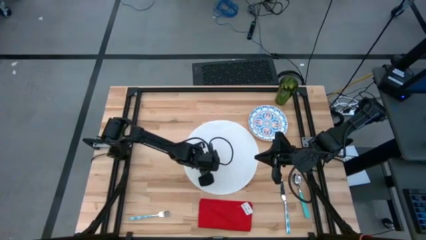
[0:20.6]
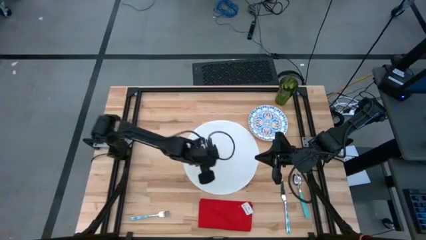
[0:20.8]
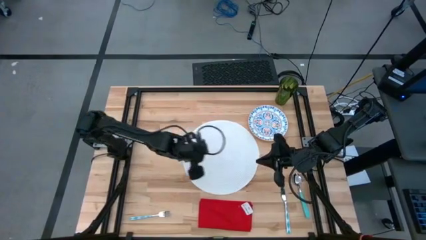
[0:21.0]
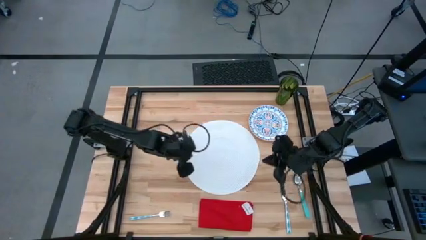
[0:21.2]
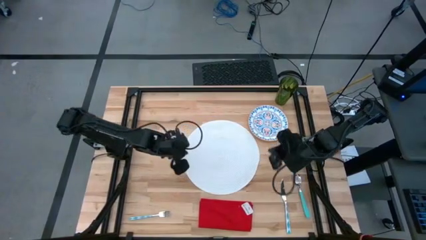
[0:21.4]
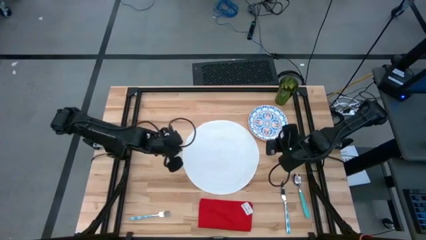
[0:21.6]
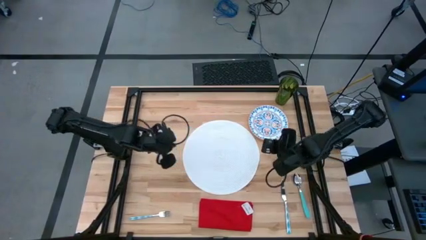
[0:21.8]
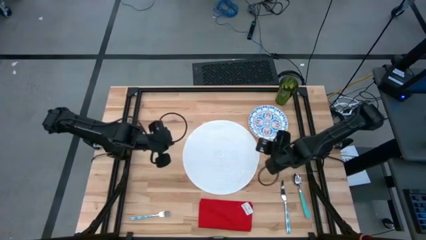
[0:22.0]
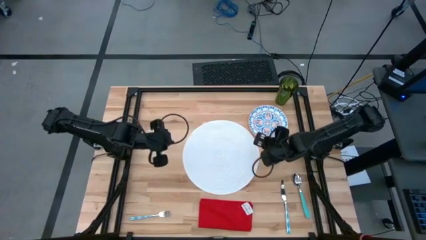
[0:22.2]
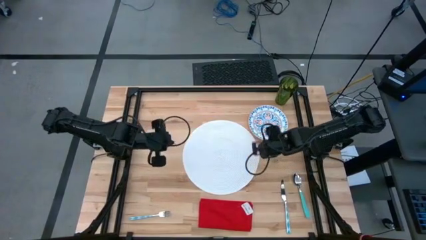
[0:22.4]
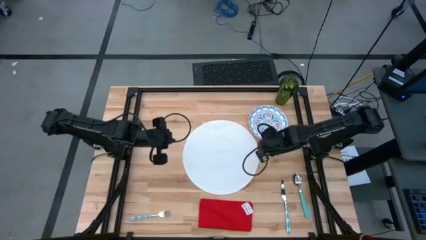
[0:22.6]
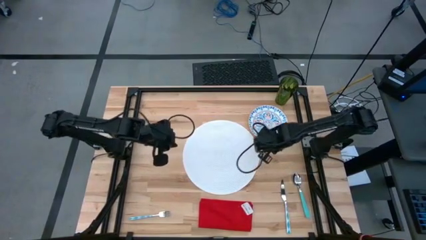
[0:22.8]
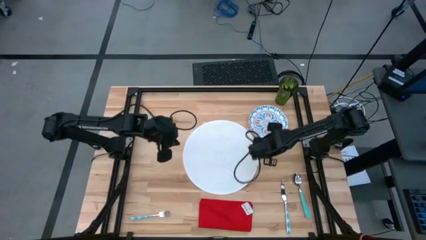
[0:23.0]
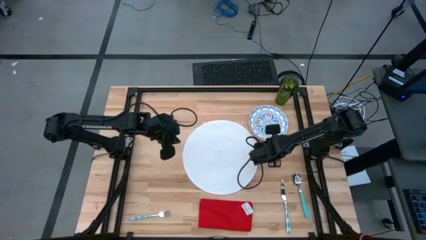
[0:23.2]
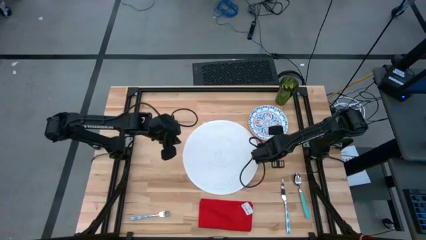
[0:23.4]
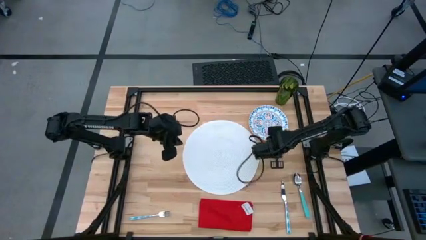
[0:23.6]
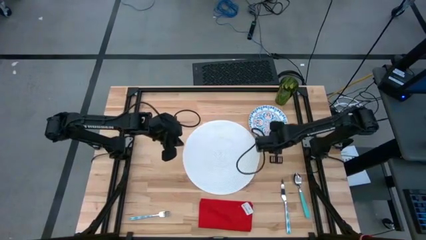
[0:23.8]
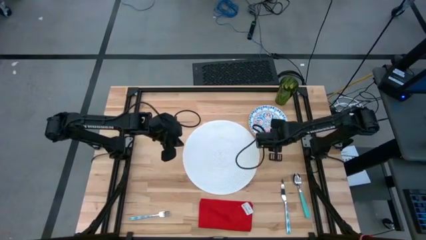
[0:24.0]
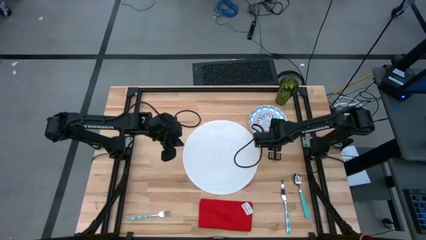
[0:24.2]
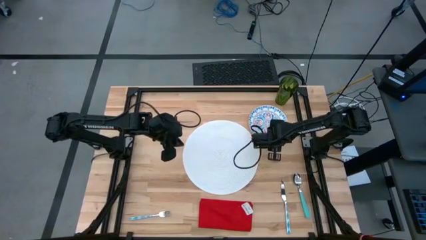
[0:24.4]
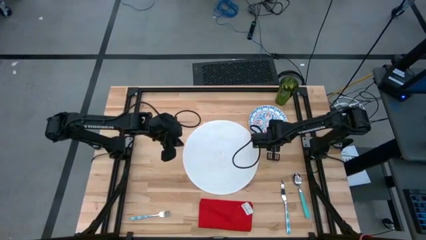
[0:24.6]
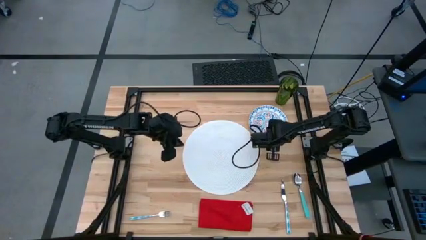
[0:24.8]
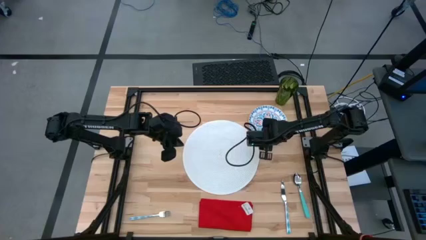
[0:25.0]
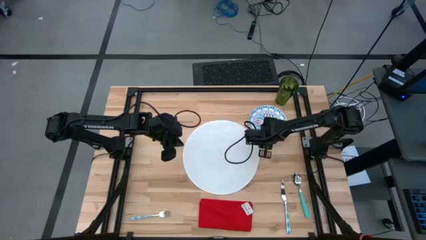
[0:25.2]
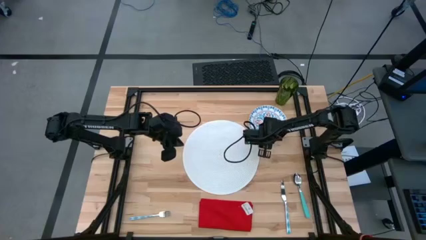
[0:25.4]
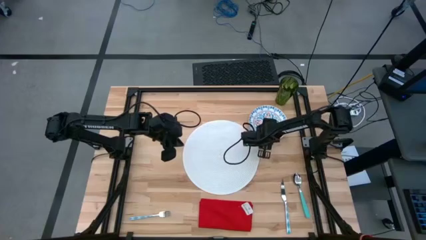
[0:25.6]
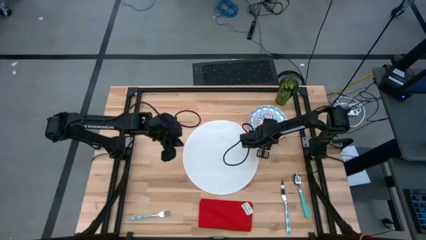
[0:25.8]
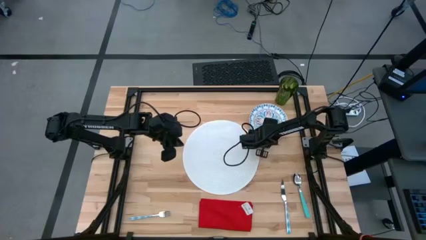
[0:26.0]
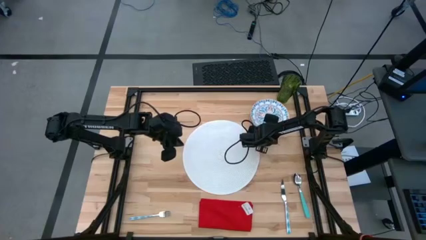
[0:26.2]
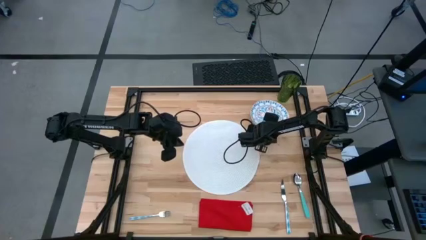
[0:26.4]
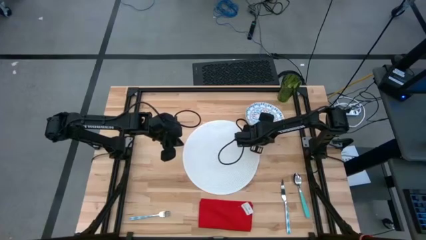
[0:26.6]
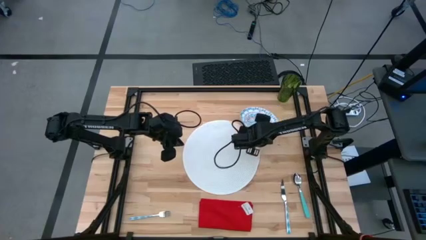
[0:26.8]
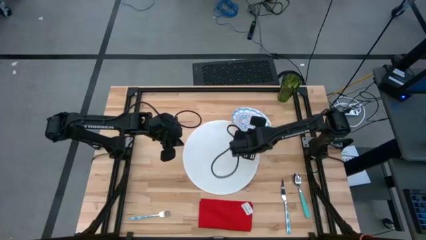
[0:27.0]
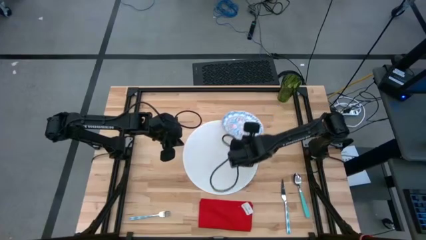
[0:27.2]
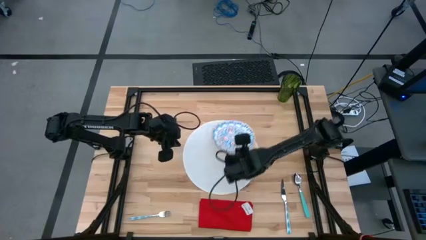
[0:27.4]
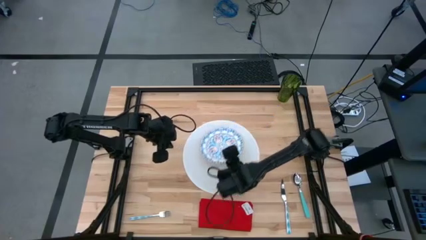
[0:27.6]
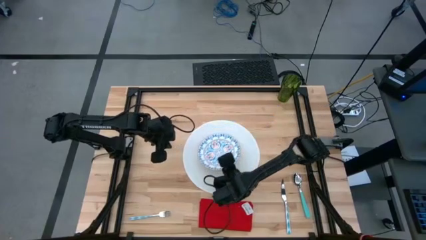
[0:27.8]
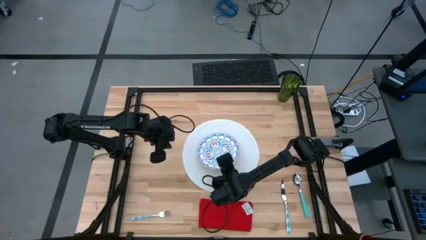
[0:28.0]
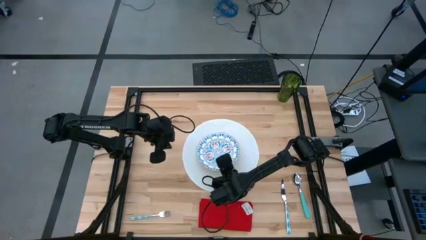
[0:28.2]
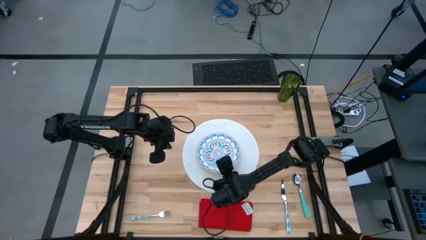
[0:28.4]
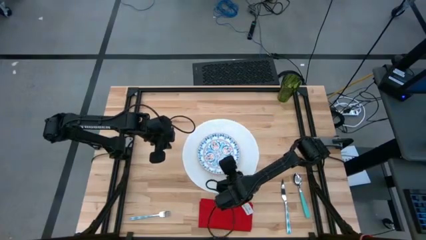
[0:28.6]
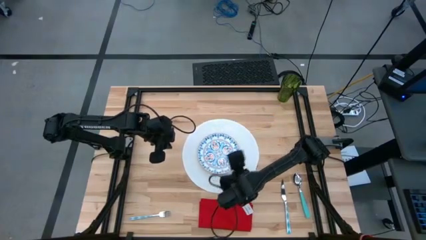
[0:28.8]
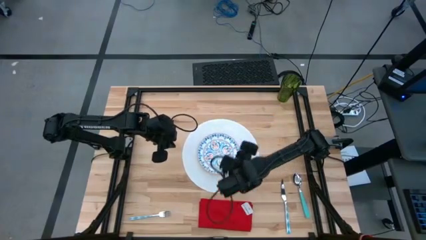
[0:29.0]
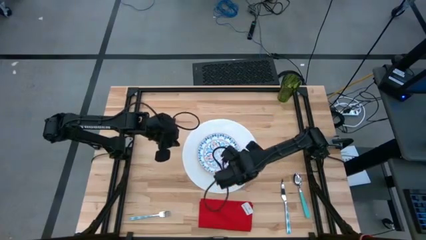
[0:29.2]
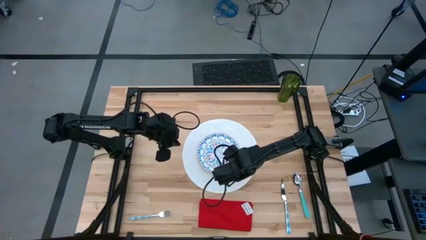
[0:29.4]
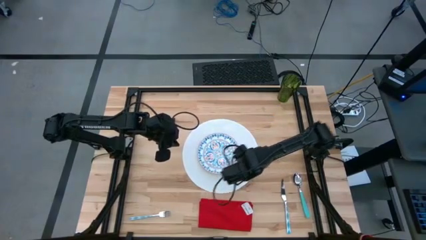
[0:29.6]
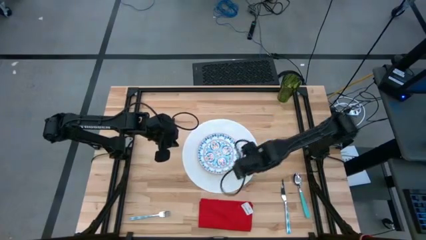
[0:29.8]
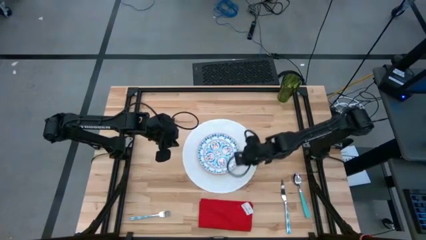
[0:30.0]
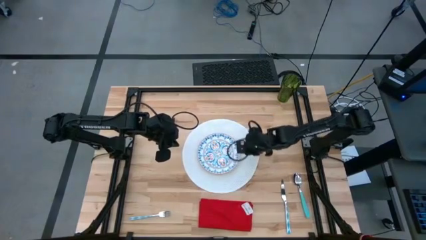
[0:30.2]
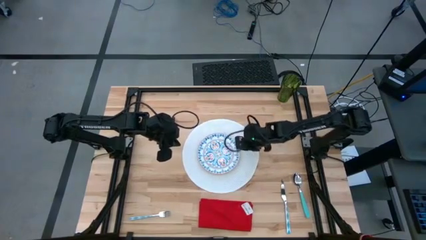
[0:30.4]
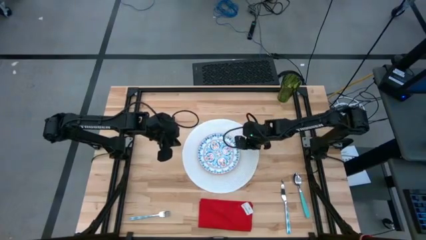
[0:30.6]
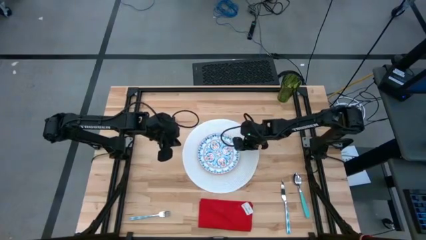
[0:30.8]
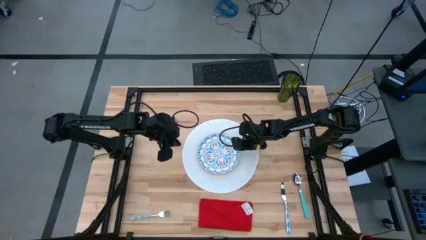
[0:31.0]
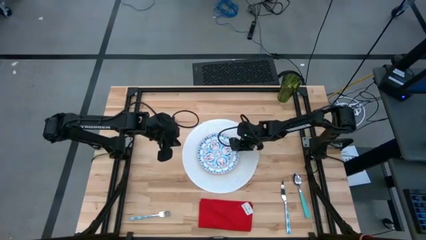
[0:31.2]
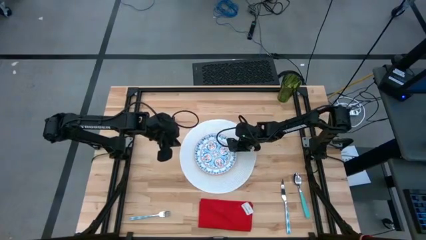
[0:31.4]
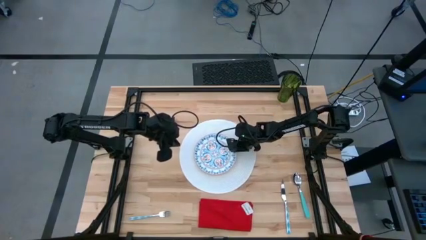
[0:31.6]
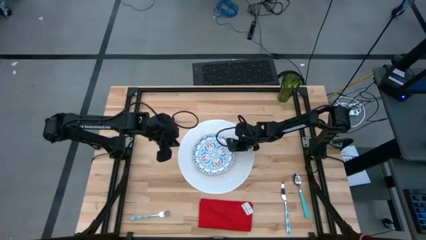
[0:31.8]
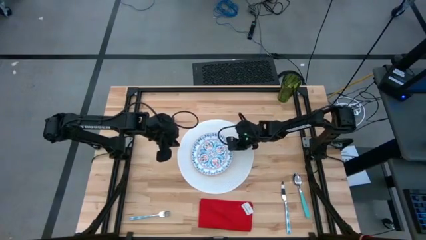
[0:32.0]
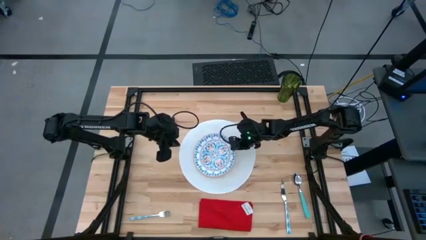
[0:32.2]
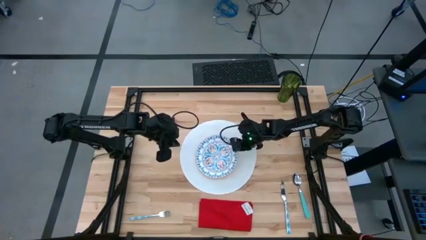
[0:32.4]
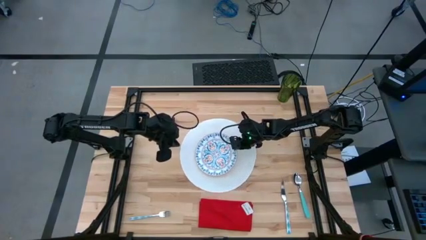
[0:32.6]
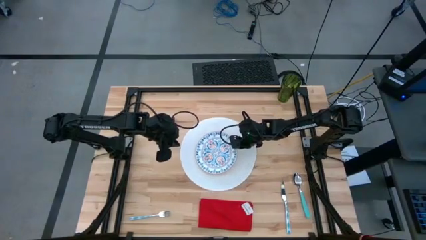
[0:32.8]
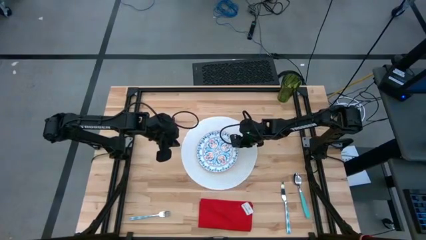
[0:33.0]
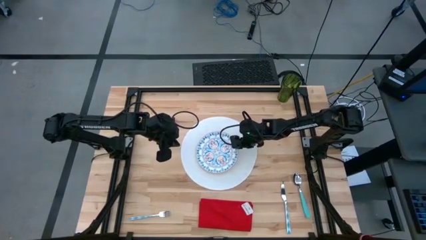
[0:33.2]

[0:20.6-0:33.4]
Task: Set table place
Put the blue orange plate on the white placemat

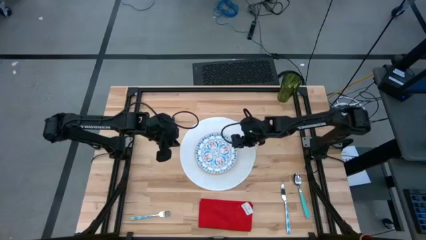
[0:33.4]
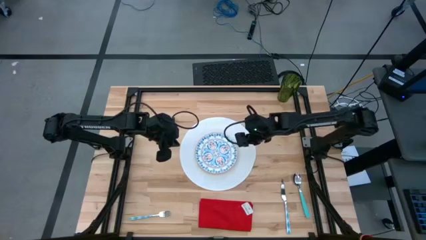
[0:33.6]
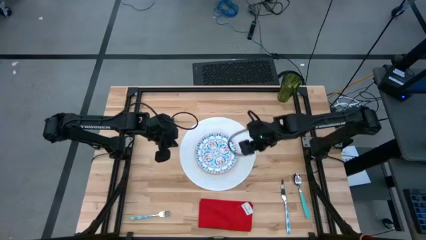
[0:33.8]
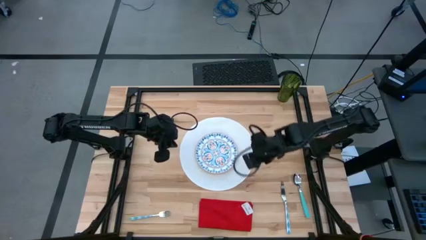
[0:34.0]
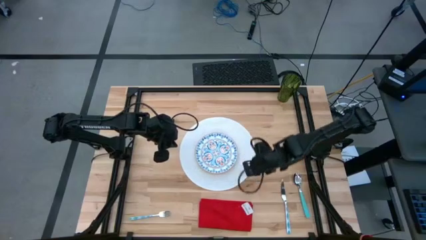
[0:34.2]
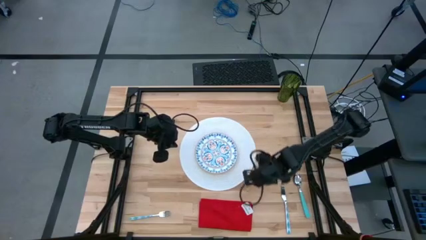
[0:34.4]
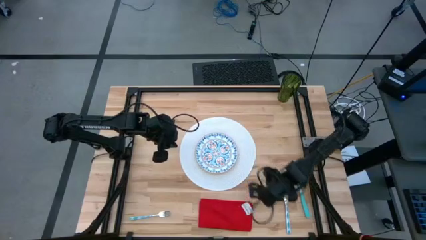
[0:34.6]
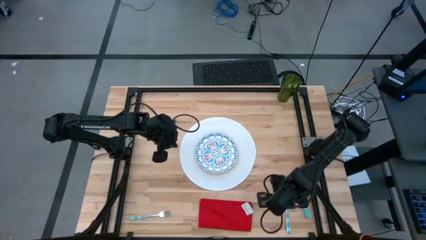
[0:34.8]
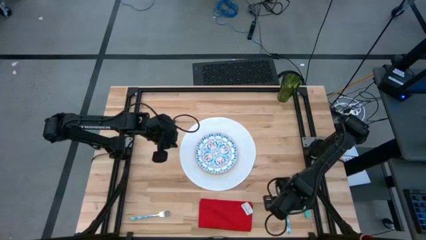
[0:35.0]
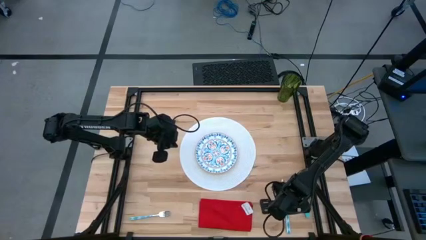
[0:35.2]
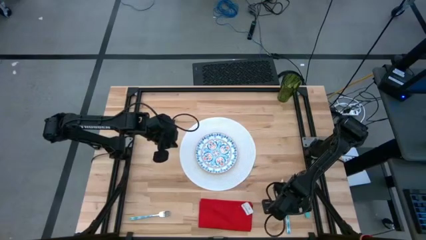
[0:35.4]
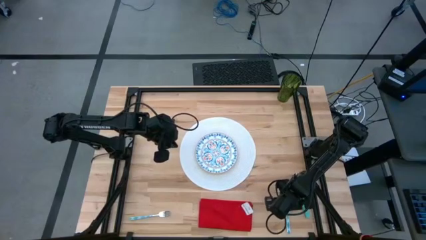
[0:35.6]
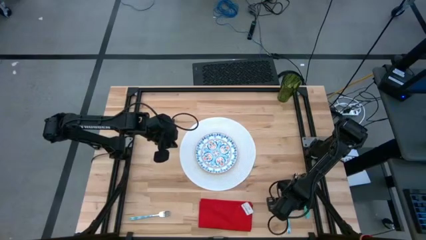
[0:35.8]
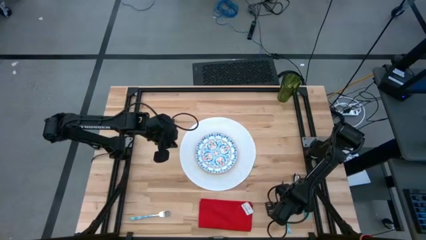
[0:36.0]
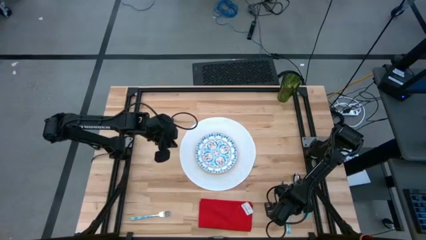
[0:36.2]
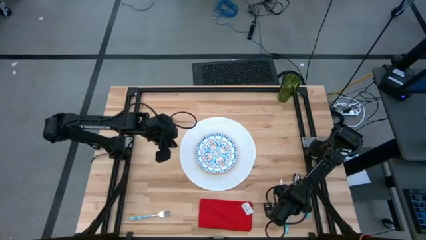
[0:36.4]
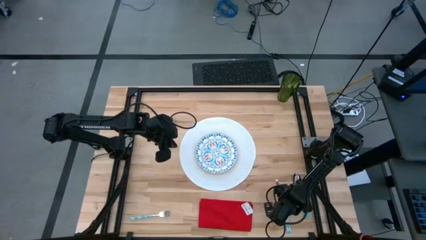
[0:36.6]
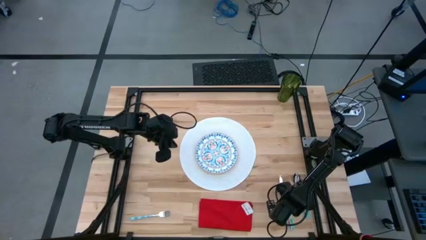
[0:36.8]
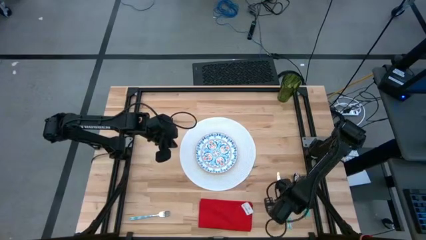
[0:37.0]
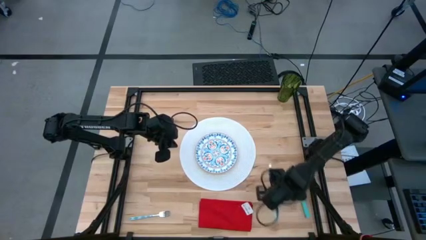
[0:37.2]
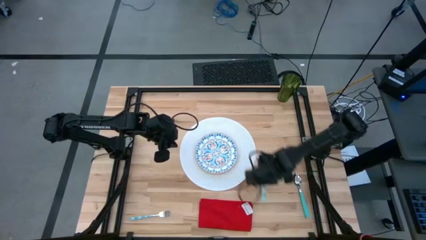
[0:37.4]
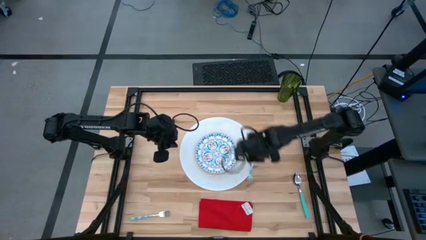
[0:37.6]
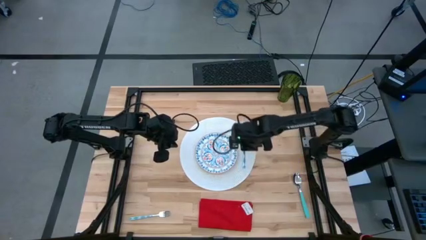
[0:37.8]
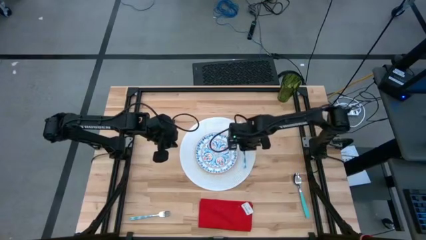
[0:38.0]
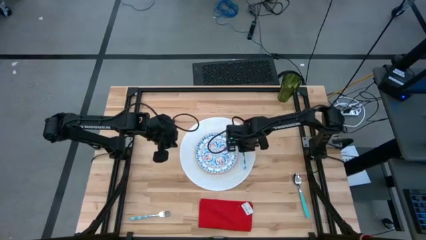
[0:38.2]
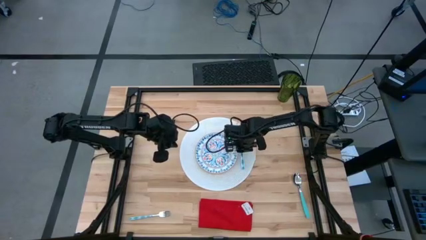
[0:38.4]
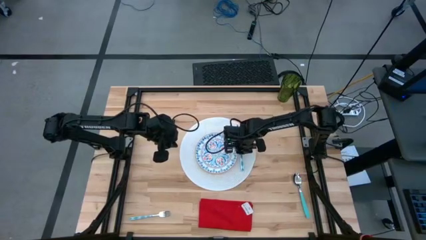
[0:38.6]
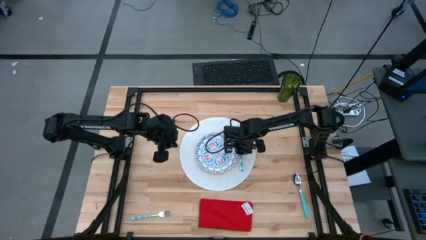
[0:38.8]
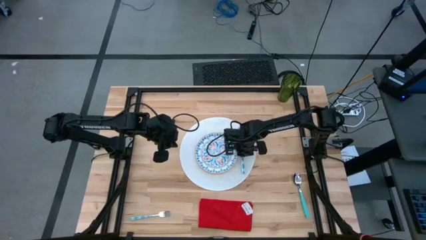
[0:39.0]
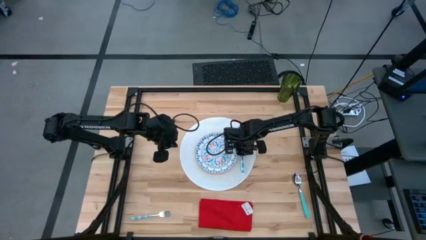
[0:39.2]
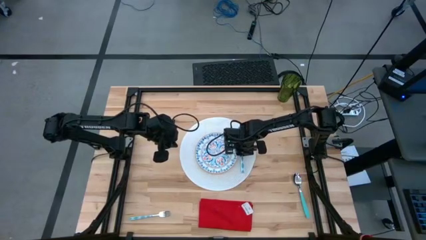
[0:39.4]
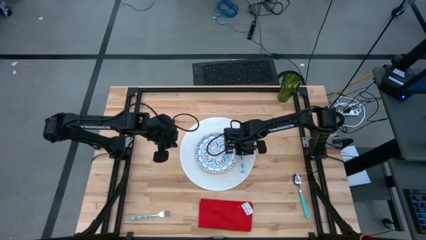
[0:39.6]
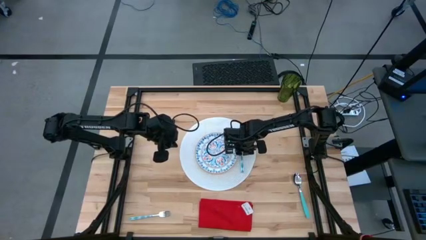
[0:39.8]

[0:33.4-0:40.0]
Put the blue table knife on the white placemat
